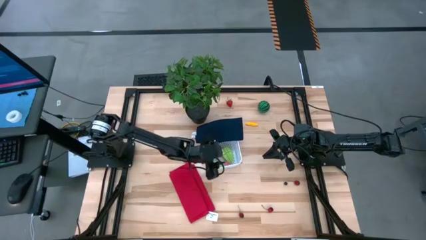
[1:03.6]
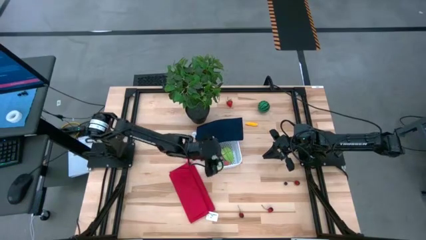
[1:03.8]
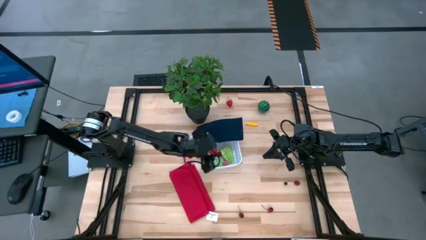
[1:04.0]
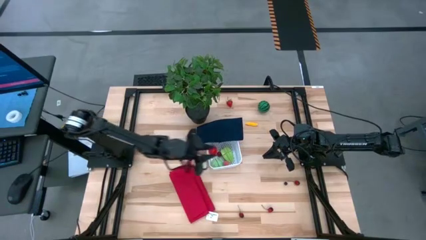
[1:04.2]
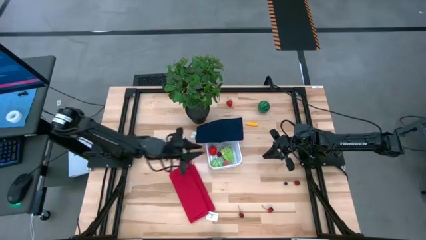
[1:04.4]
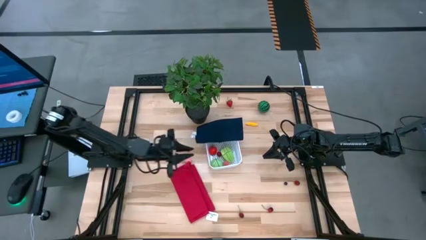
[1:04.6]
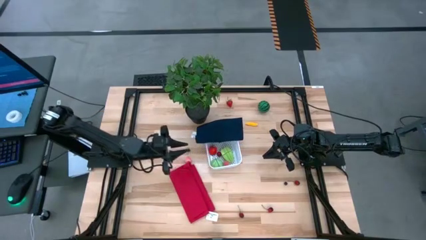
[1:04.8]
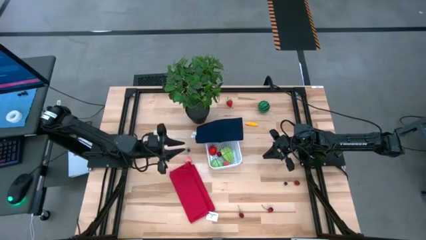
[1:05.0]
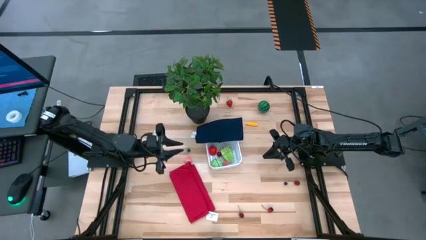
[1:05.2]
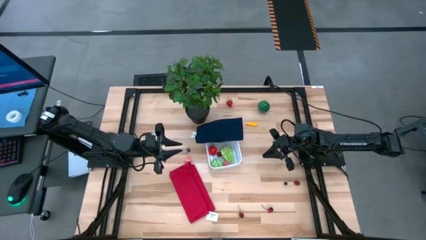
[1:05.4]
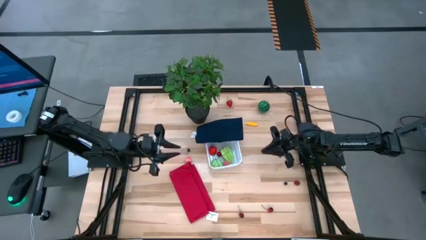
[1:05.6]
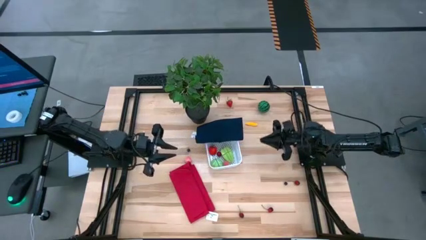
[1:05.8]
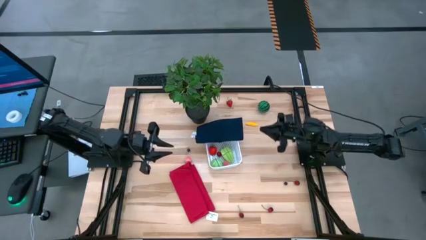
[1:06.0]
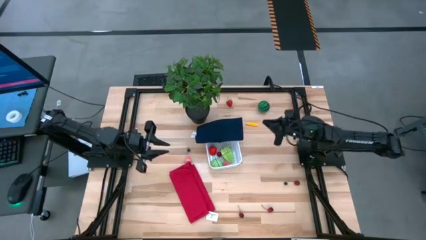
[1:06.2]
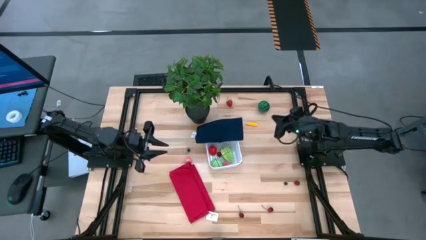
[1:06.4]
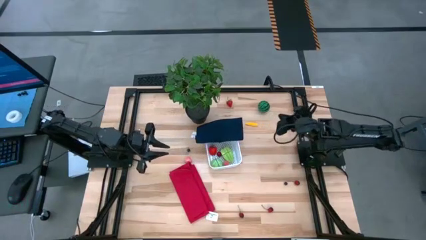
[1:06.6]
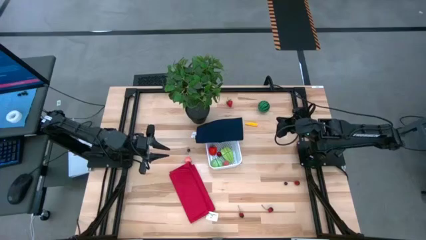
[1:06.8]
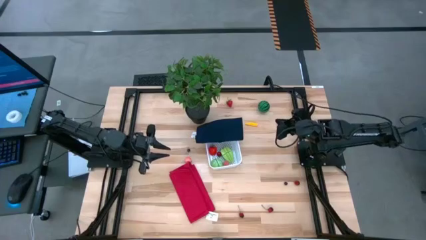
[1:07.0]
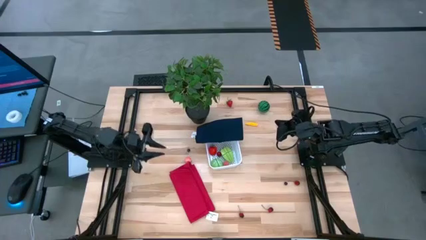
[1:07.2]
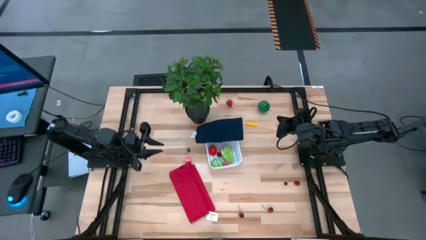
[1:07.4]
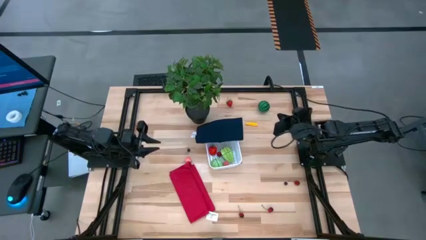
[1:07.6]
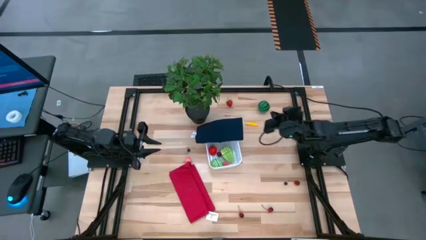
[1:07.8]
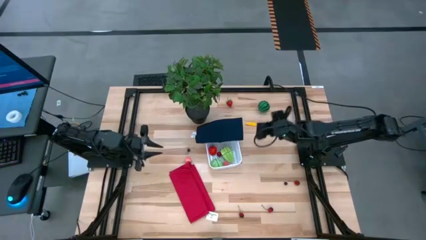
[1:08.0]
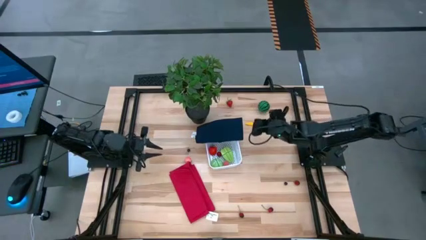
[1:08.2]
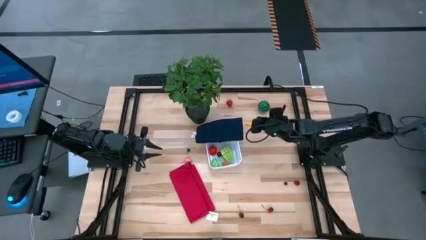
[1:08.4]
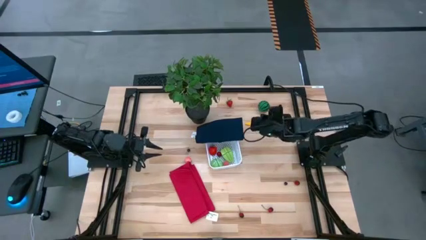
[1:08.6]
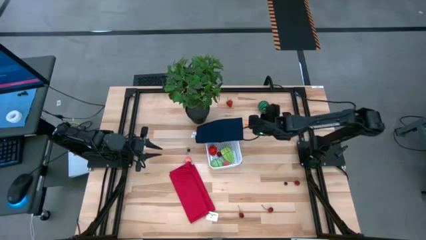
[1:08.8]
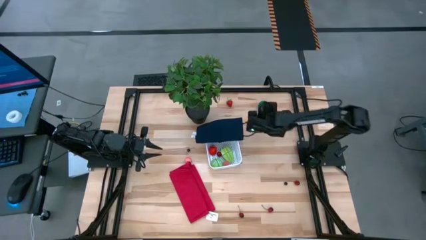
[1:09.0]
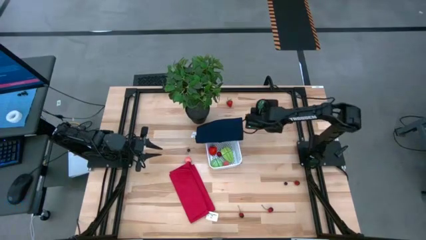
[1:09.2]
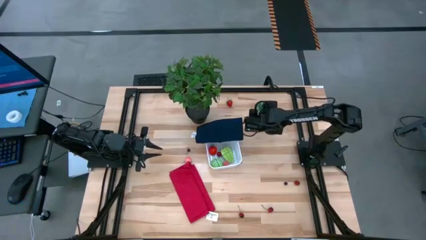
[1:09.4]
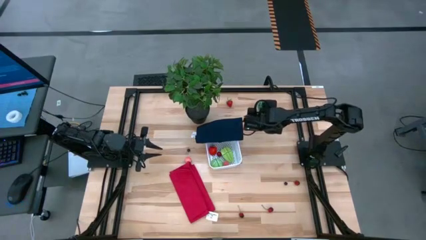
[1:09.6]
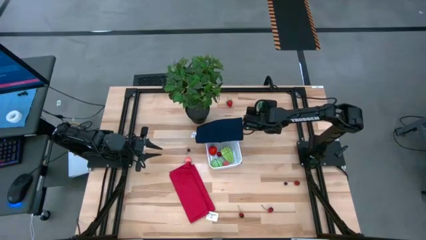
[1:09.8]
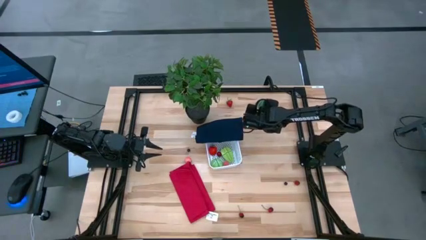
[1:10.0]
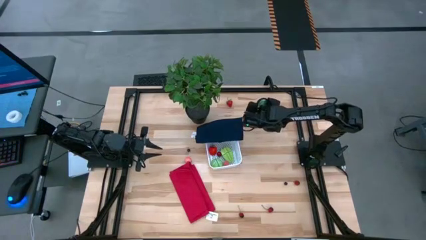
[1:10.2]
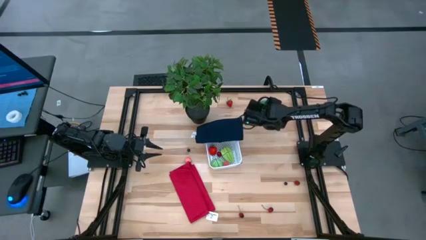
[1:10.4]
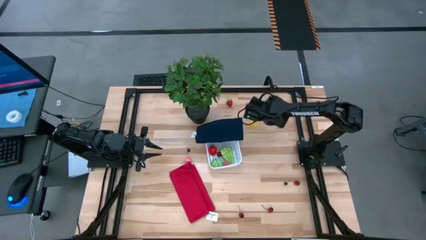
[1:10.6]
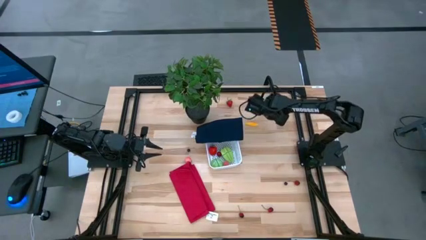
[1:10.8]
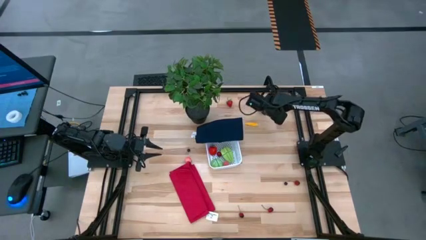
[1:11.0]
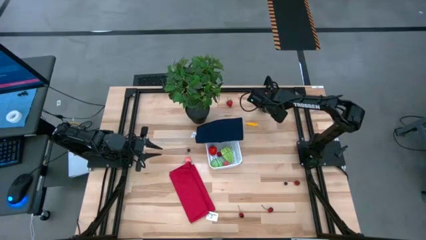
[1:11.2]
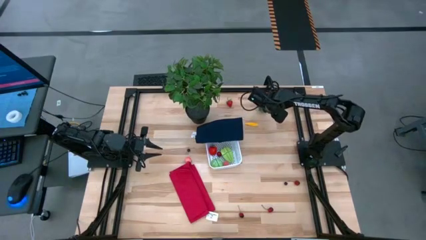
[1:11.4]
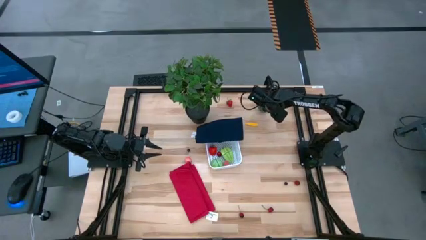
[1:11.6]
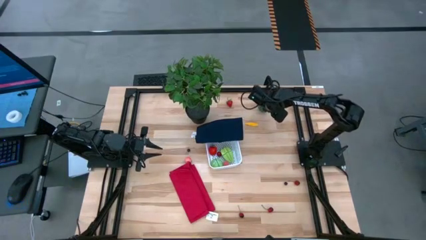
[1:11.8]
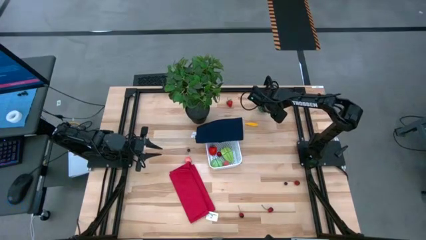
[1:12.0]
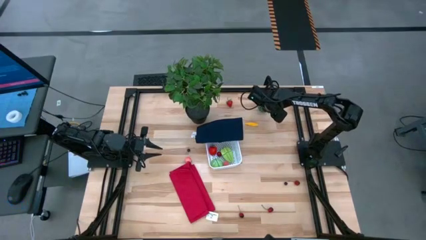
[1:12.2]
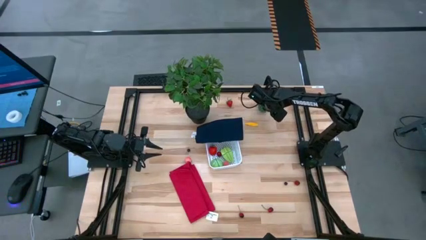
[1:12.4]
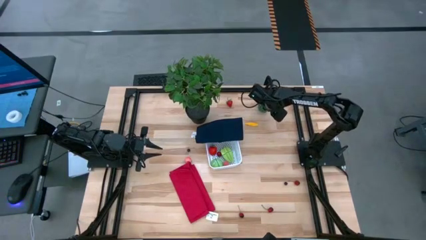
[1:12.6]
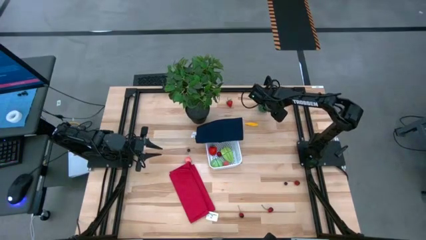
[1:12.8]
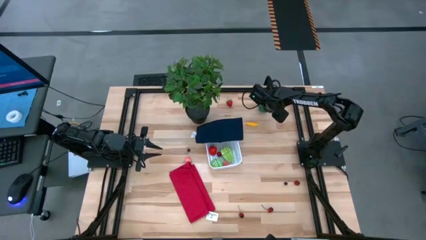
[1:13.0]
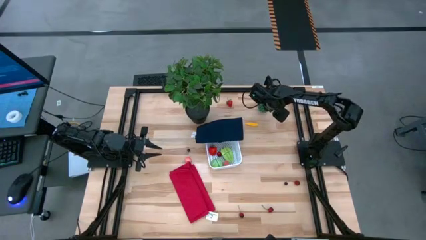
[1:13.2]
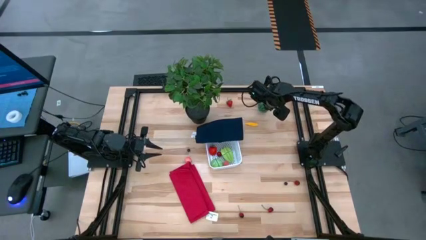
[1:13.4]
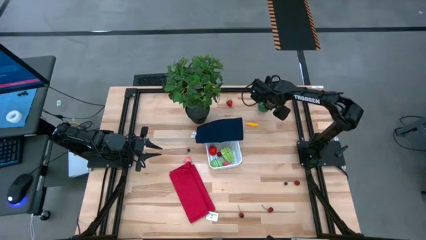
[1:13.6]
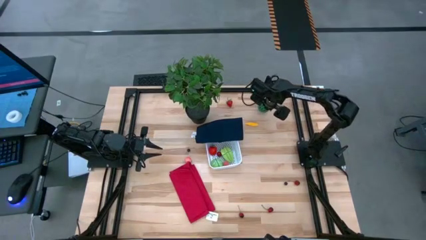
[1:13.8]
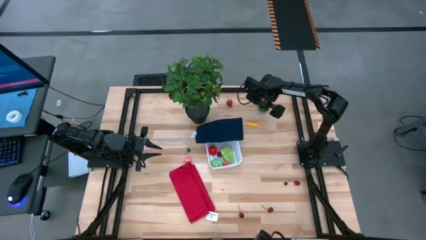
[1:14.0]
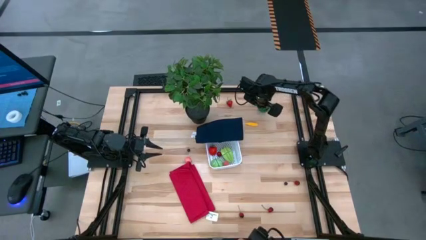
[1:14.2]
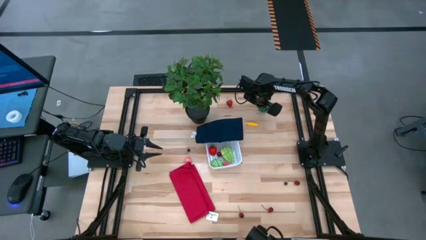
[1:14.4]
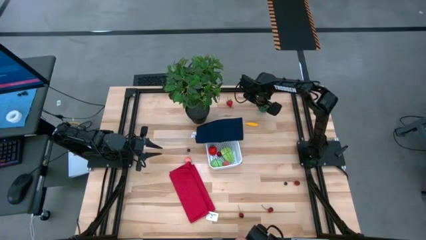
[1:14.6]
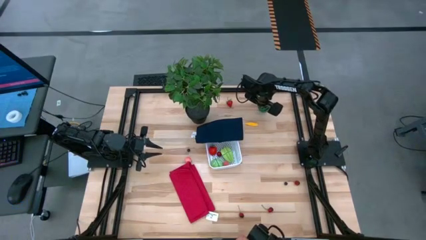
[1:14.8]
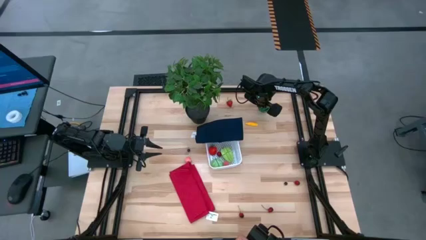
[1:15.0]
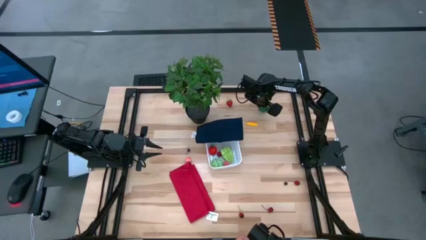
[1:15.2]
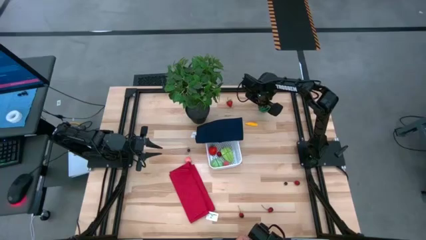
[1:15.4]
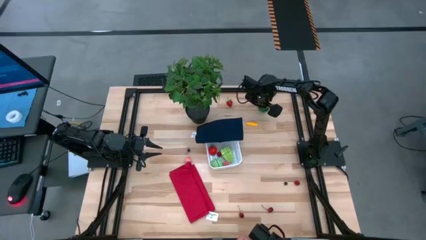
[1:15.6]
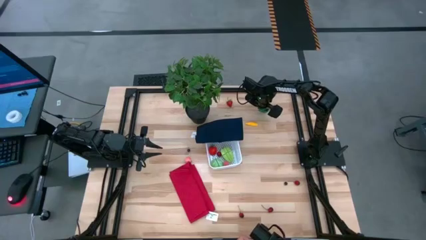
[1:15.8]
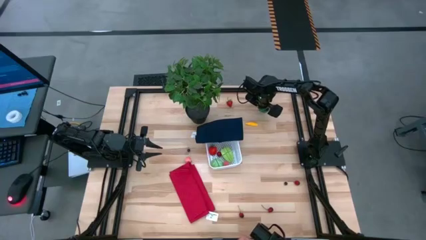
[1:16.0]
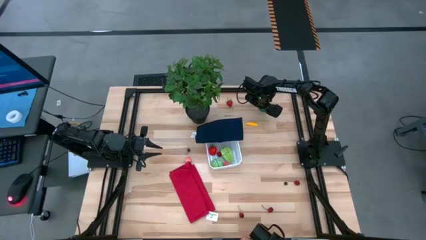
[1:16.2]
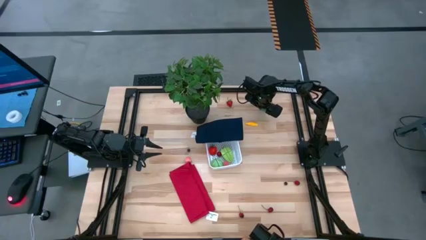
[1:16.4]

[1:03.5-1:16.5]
Task: Pick and placing Produce into tupperware
Put the watermelon into the bin

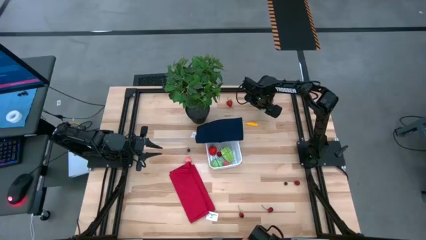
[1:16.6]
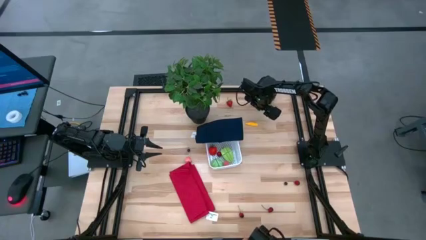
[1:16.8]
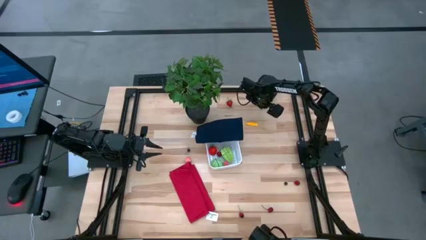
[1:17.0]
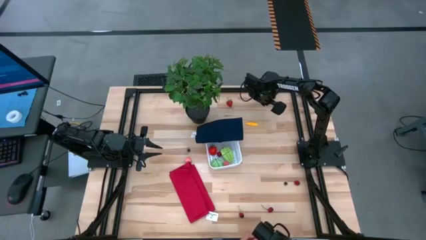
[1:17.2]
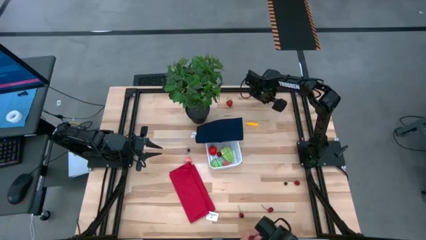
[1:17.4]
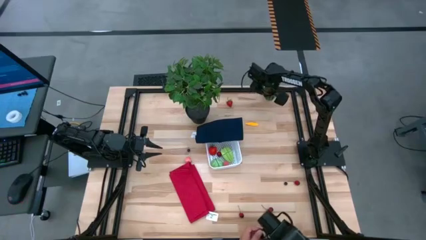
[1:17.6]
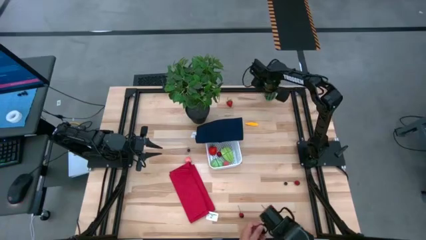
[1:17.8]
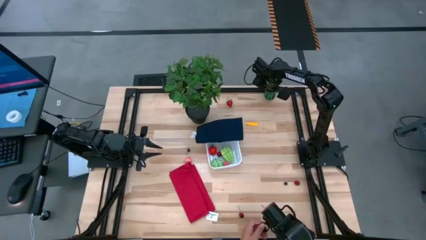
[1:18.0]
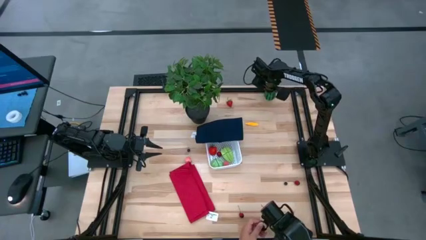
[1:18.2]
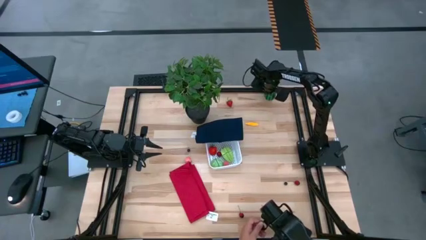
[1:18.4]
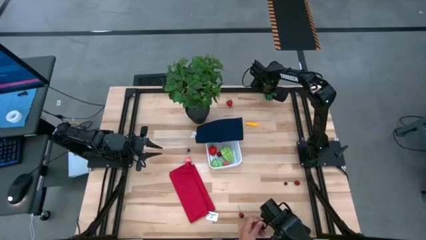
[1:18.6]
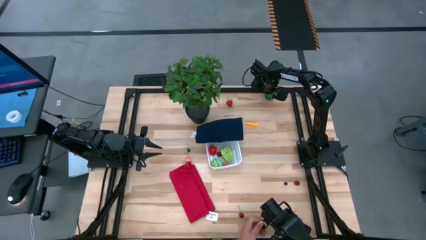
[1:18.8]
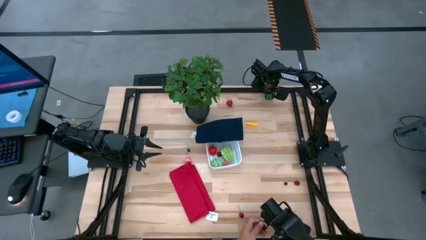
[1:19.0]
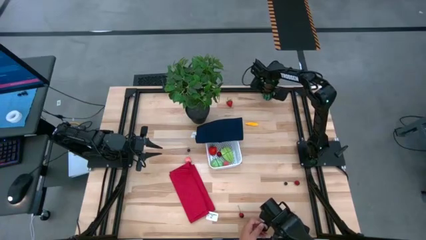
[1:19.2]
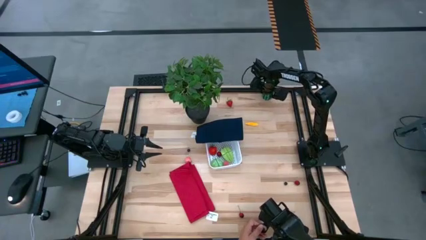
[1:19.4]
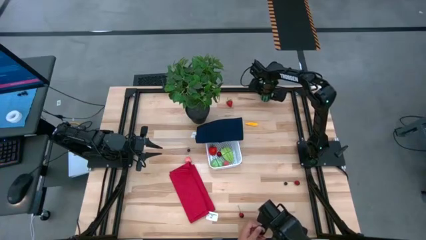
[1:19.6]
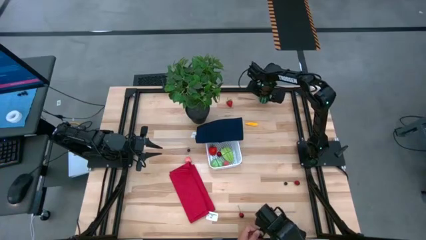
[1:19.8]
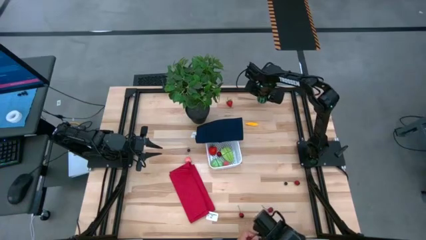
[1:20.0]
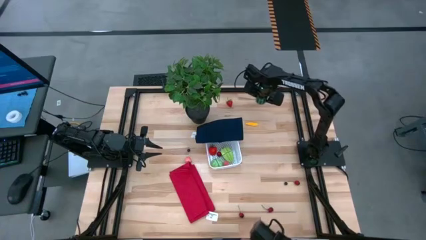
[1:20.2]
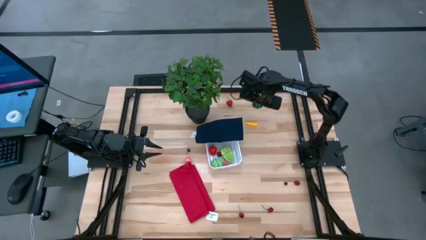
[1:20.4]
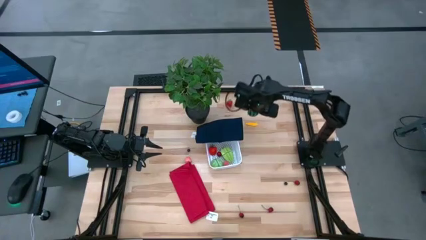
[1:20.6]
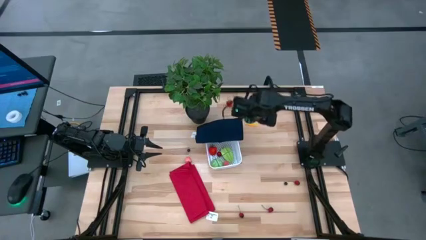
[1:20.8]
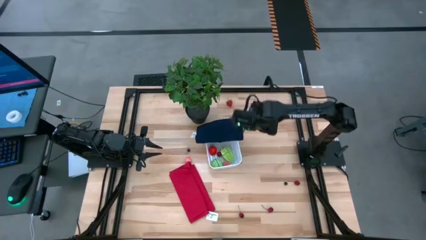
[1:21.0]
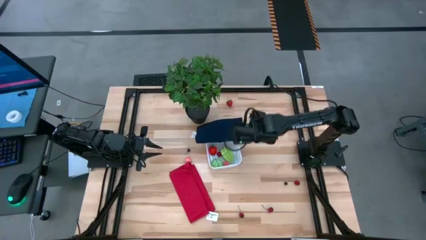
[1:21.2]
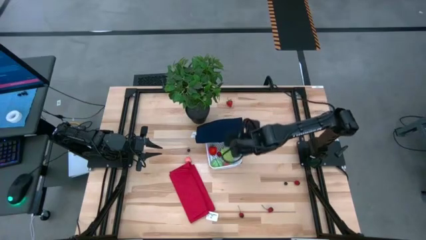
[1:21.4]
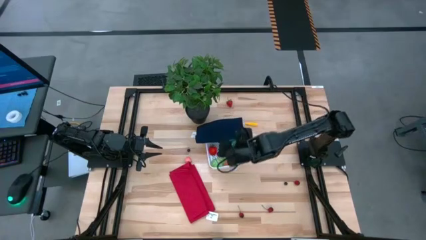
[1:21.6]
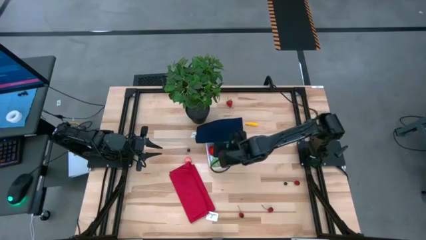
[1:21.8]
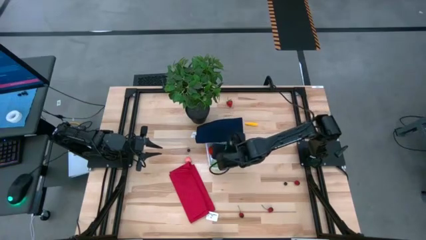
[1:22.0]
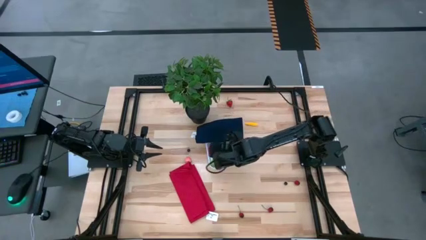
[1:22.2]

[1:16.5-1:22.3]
Put the watermelon into the bin
